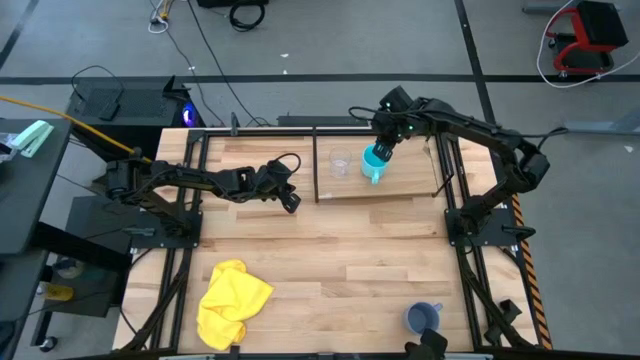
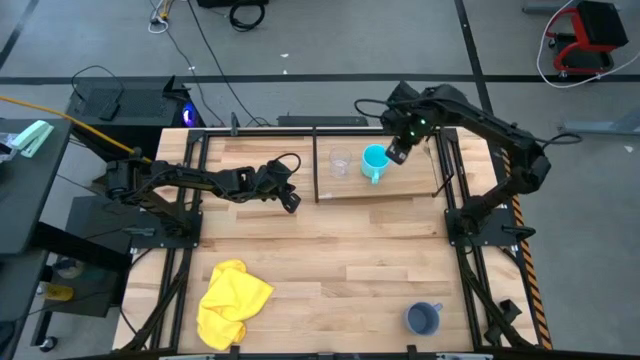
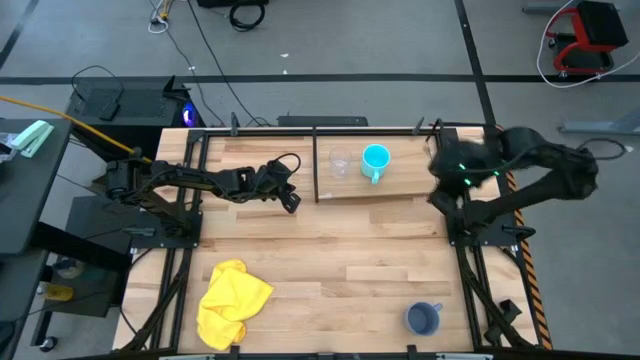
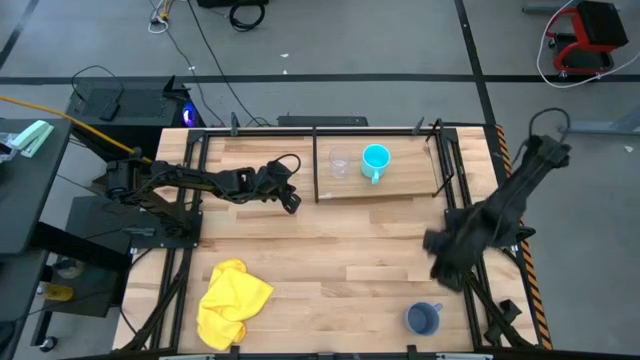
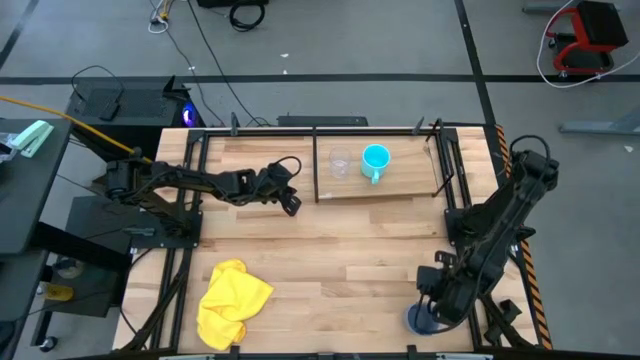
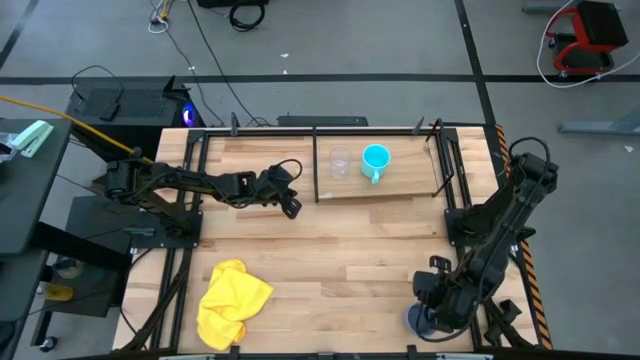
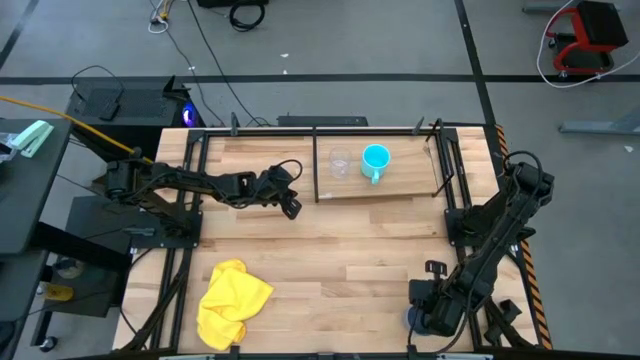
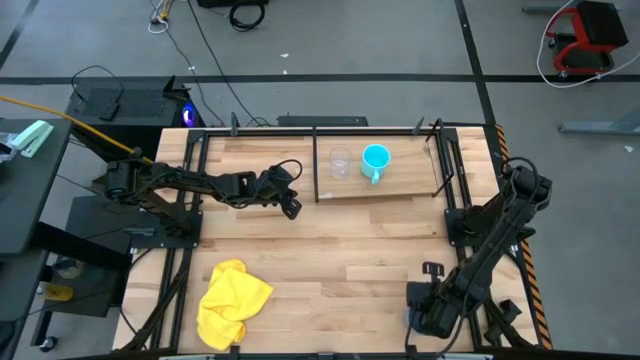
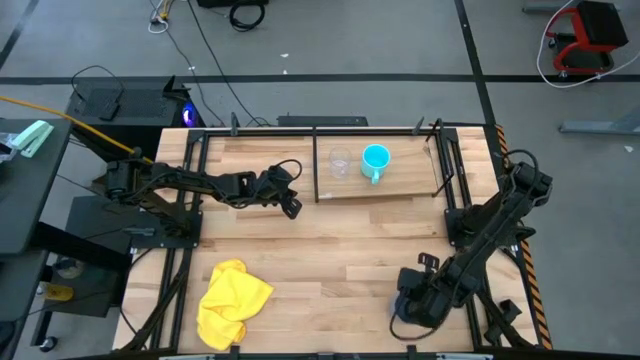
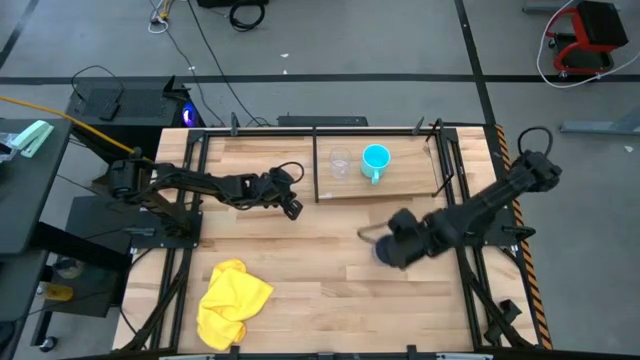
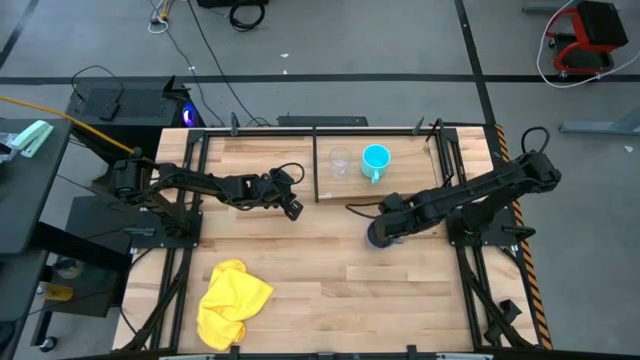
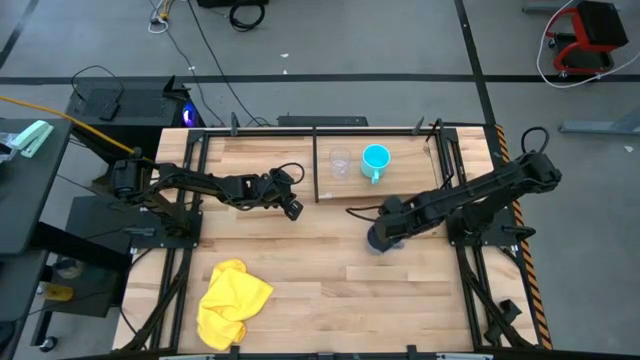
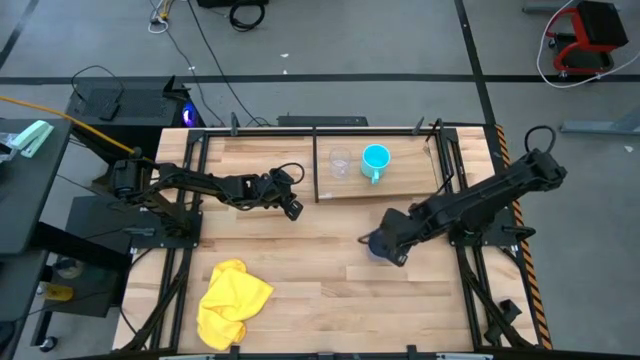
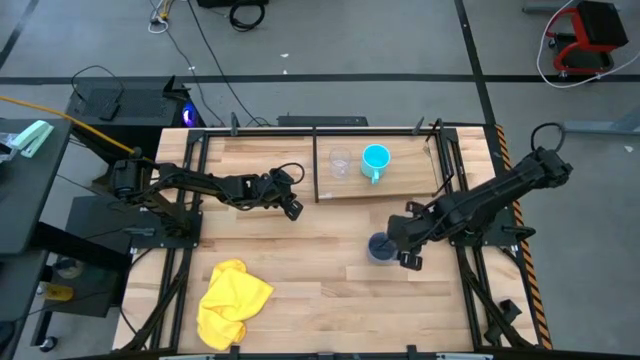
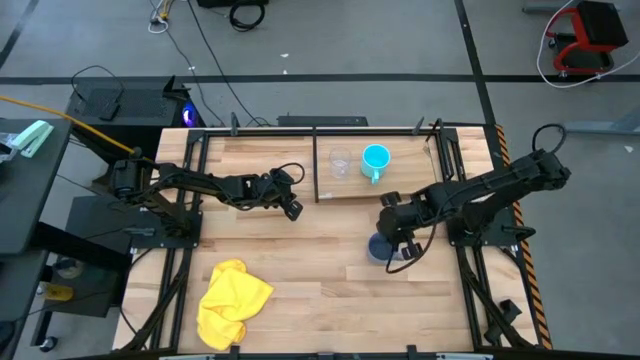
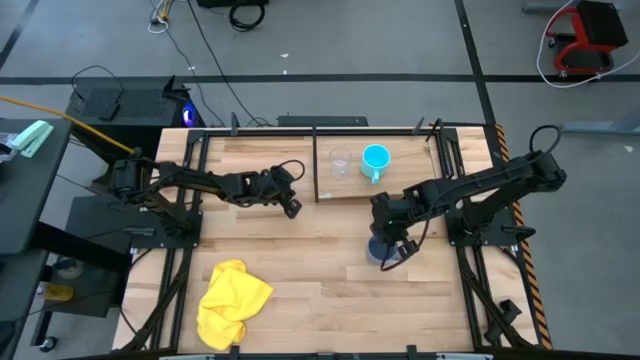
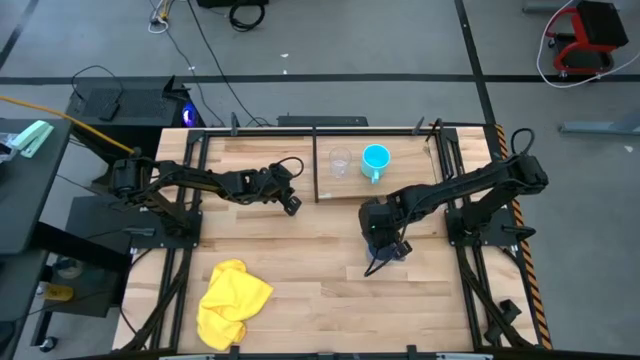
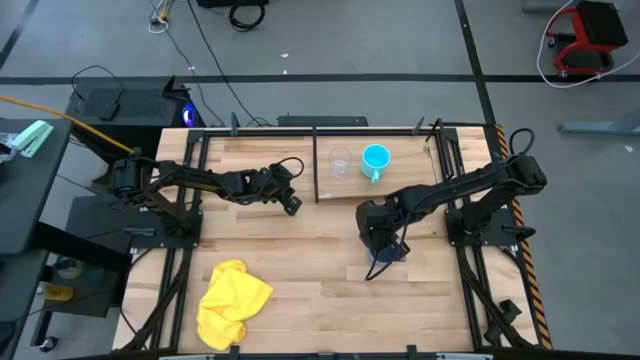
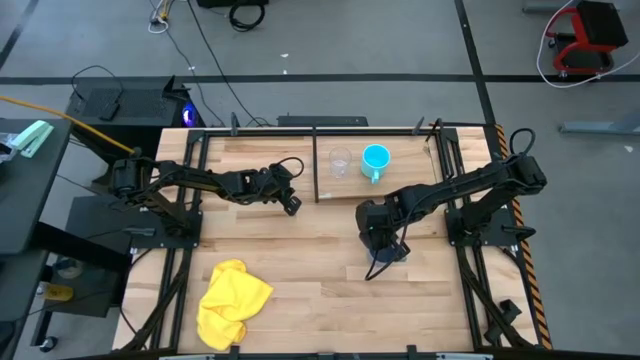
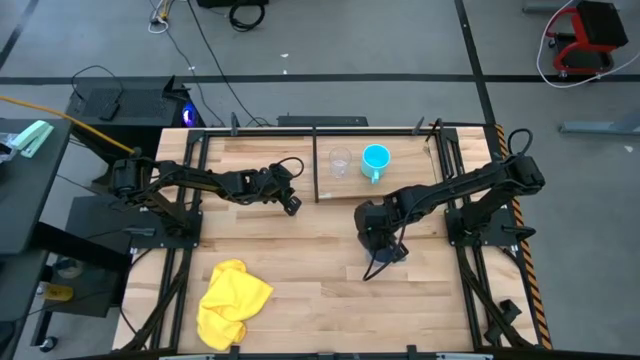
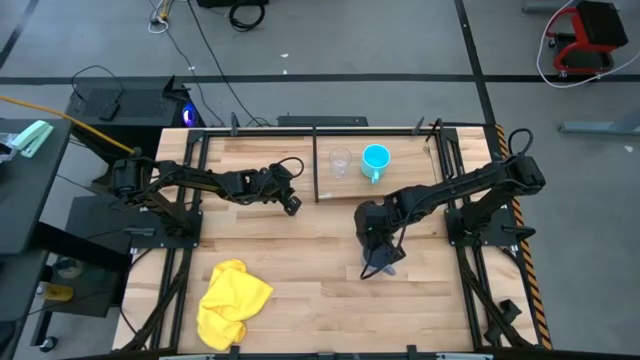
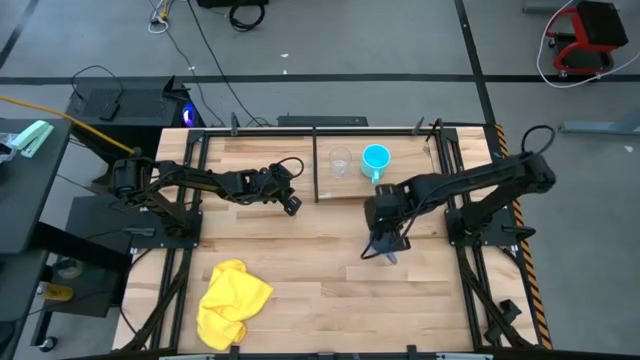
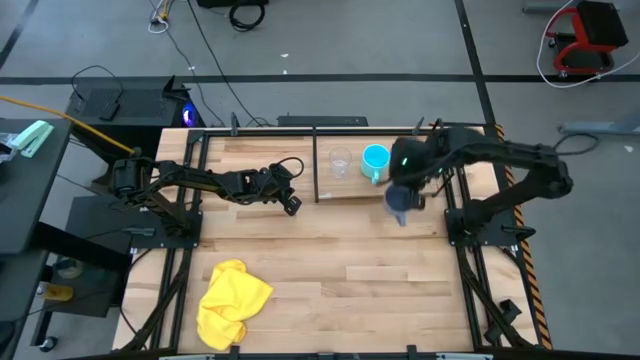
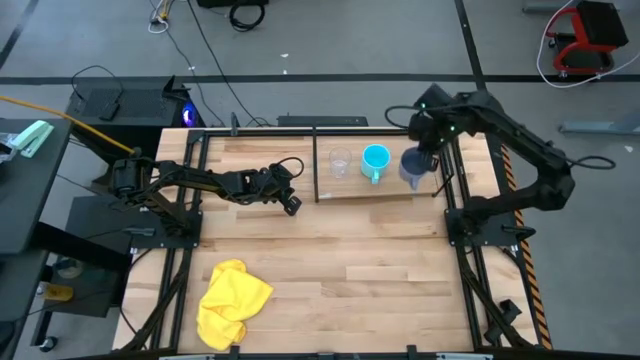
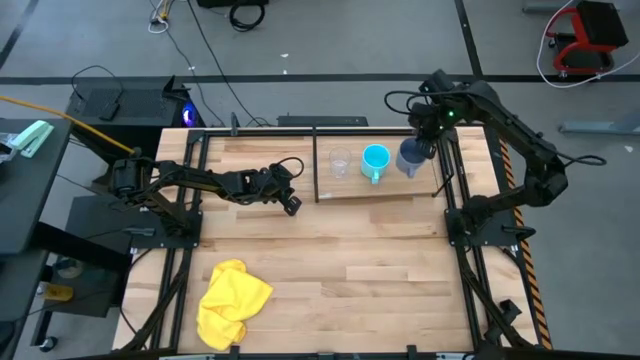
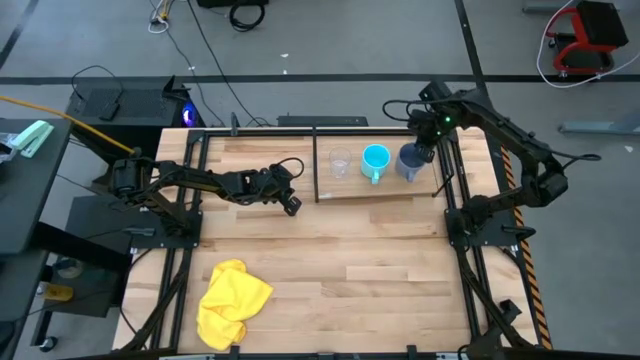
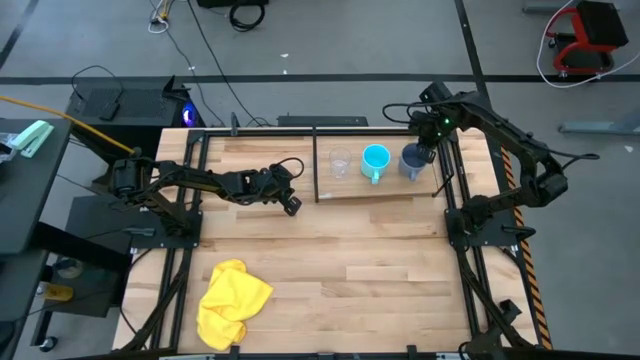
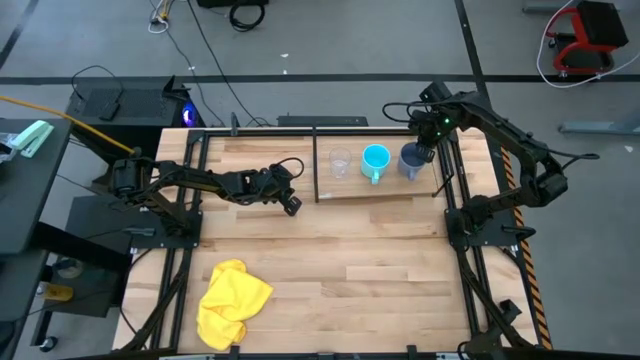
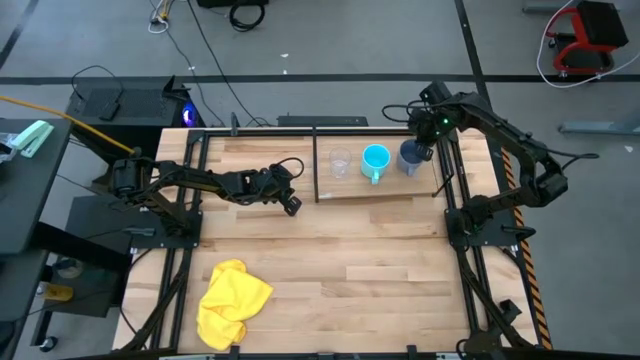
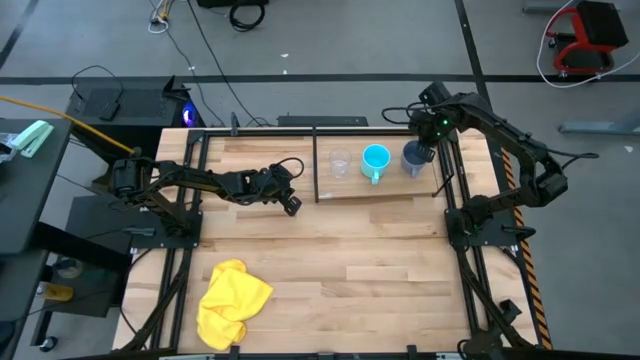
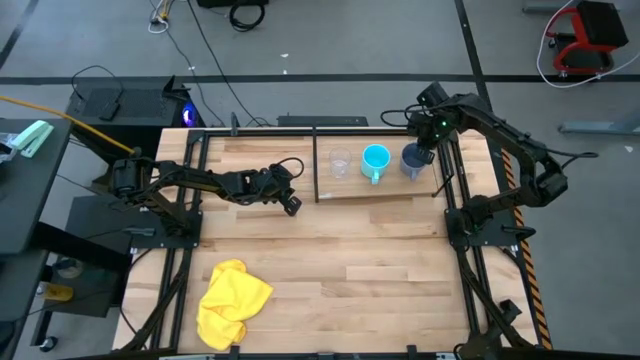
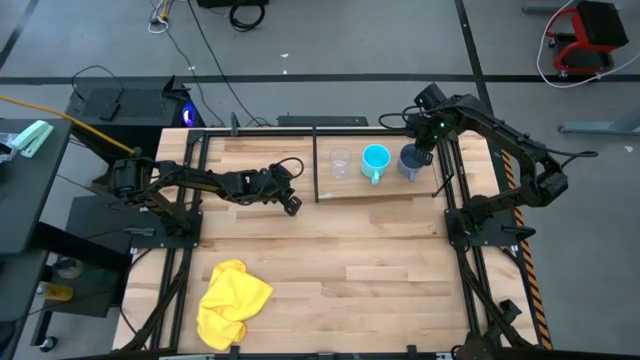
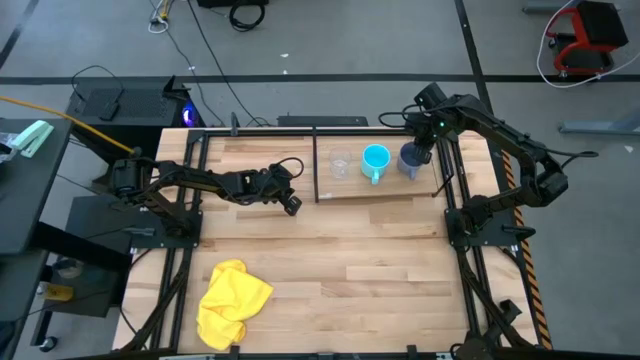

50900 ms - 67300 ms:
Task: Stack small to large cups/mugs on shelf
Put the purple mug on the shelf

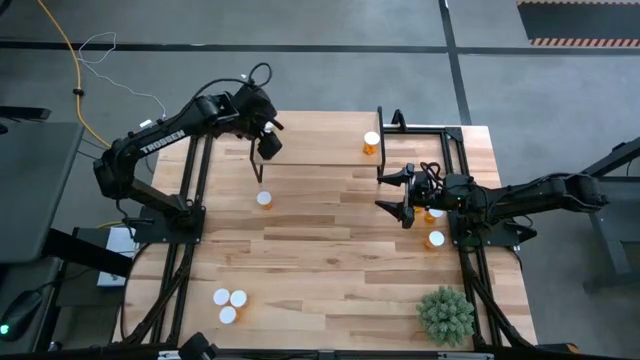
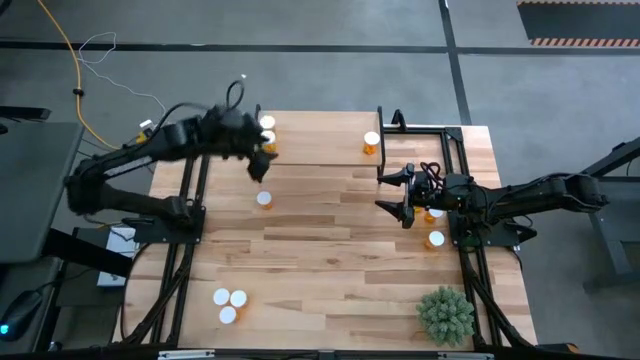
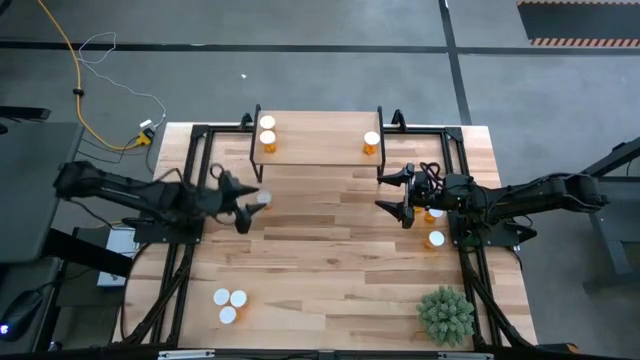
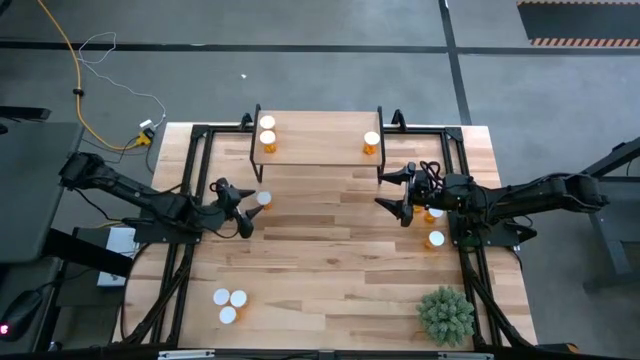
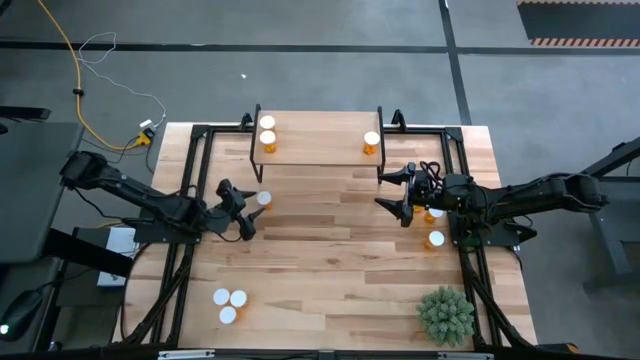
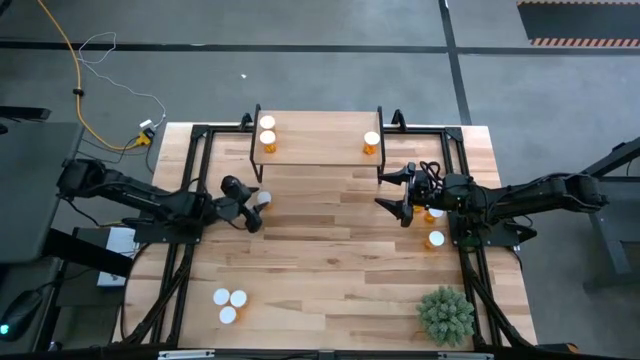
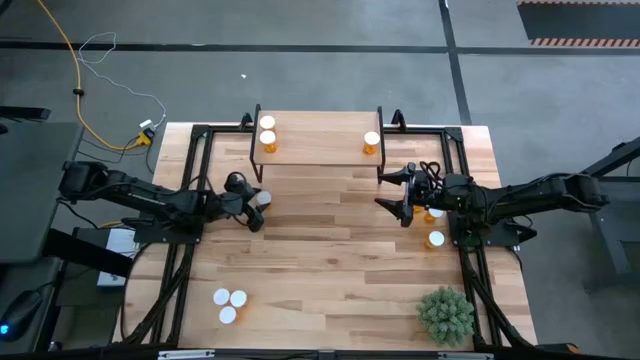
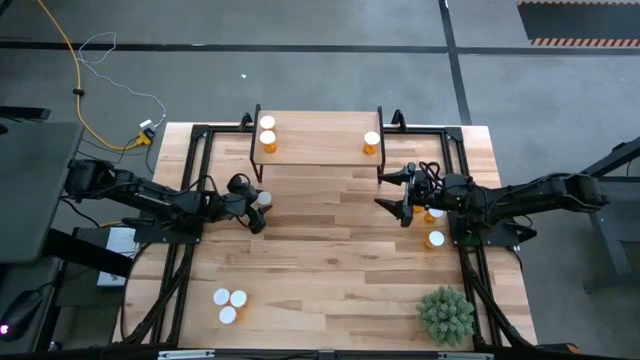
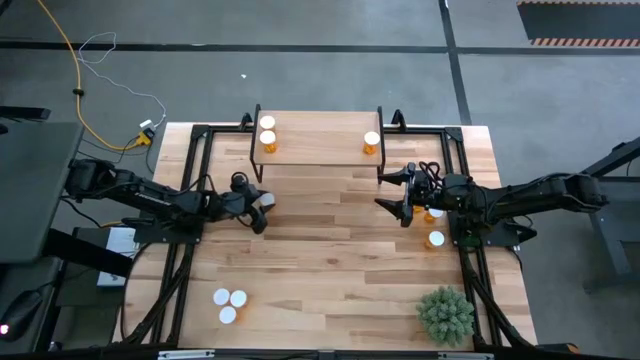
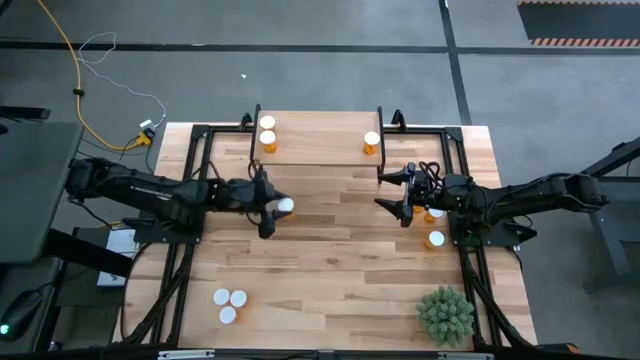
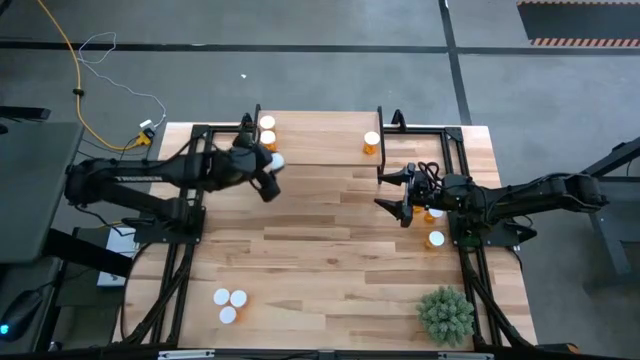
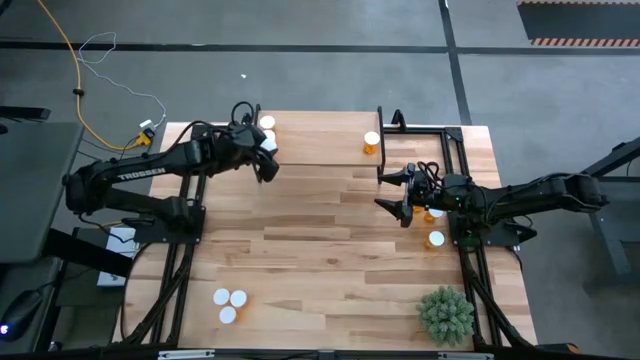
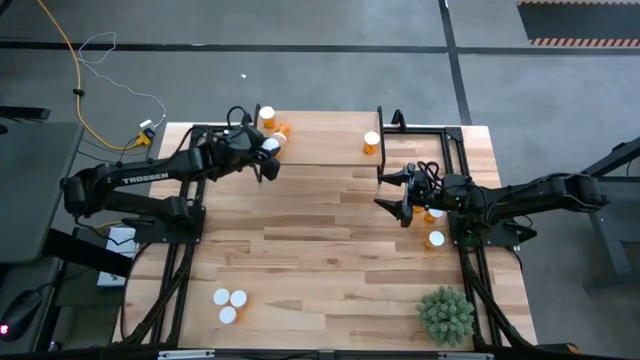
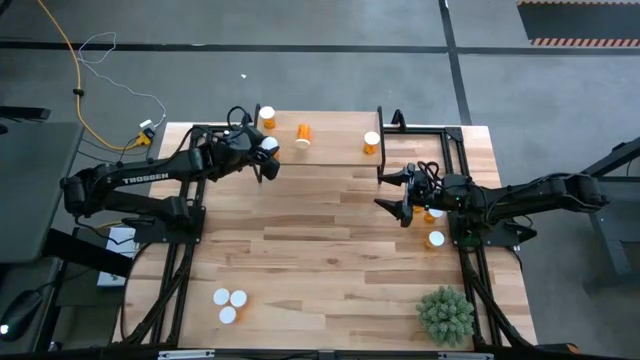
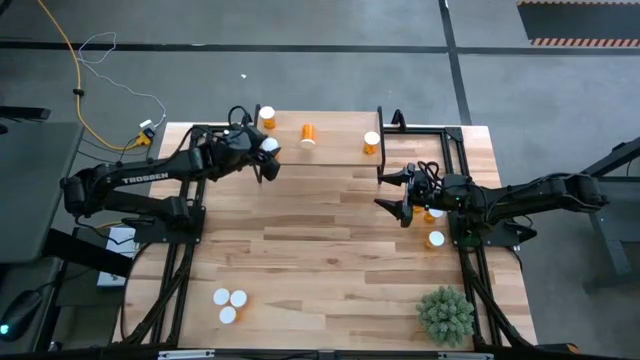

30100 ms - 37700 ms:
Task: Pick and place medicine bottles onto shelf by color
Put the orange pill bottle on the shelf
